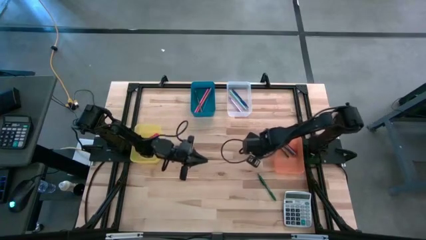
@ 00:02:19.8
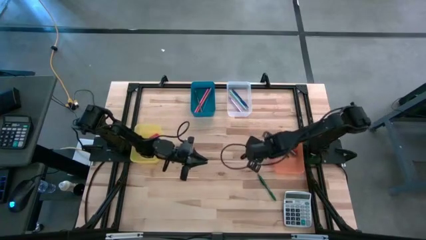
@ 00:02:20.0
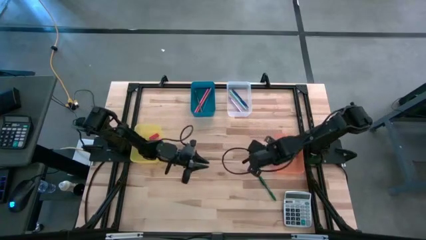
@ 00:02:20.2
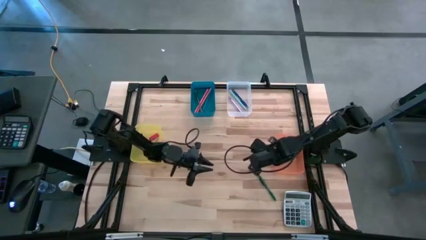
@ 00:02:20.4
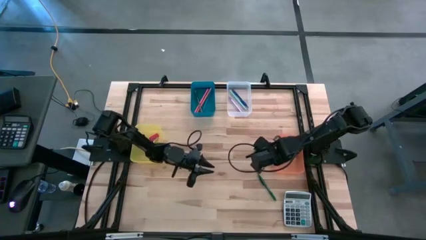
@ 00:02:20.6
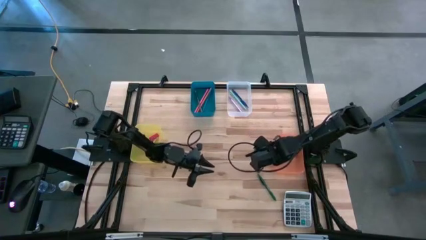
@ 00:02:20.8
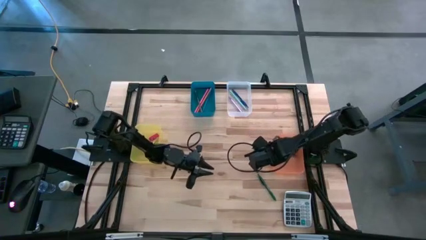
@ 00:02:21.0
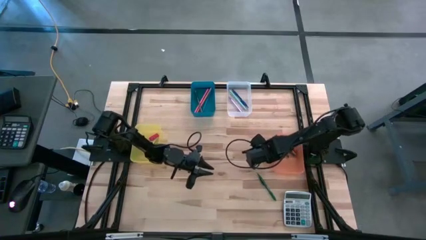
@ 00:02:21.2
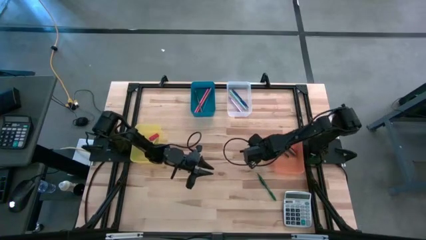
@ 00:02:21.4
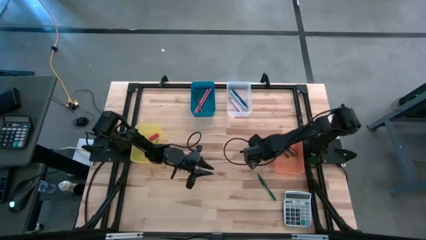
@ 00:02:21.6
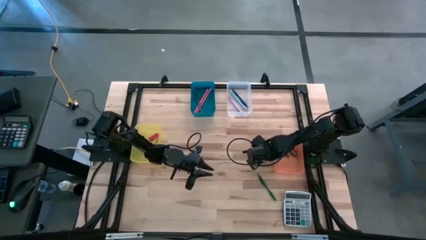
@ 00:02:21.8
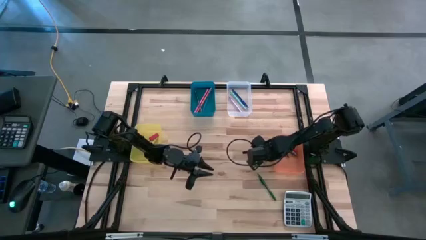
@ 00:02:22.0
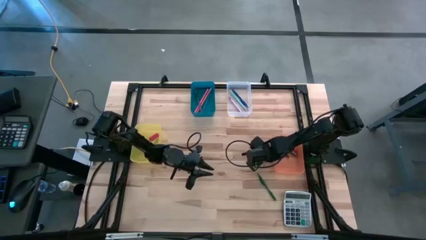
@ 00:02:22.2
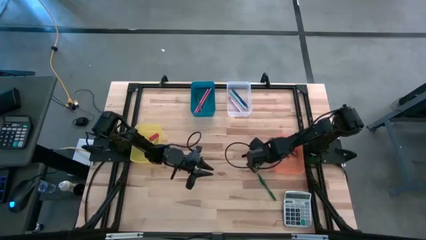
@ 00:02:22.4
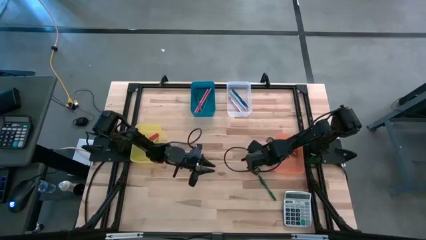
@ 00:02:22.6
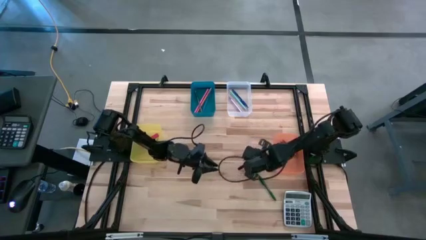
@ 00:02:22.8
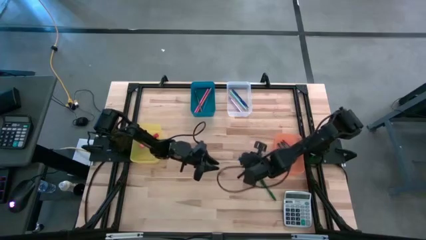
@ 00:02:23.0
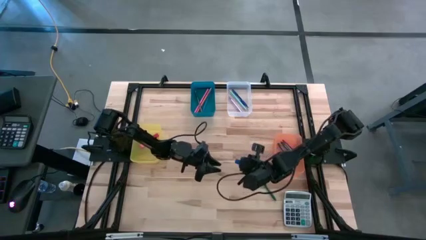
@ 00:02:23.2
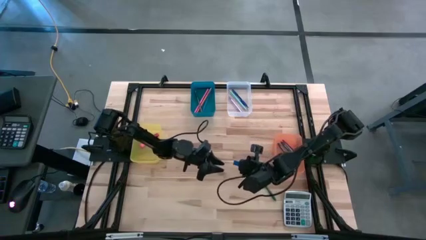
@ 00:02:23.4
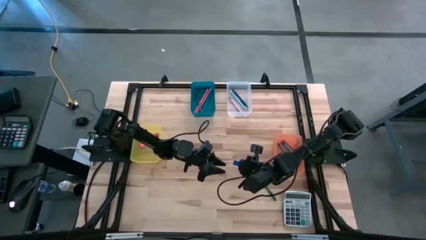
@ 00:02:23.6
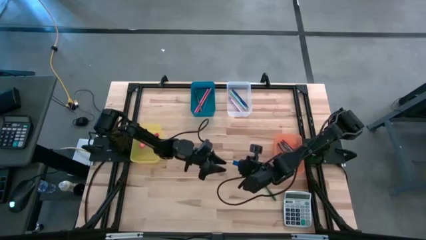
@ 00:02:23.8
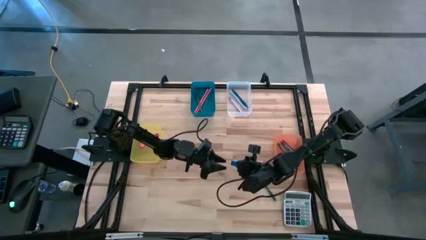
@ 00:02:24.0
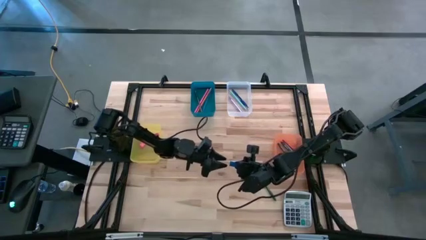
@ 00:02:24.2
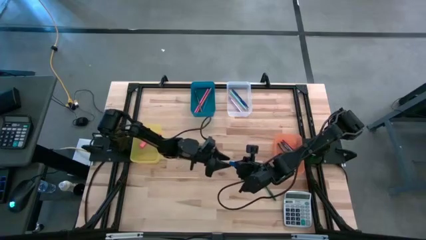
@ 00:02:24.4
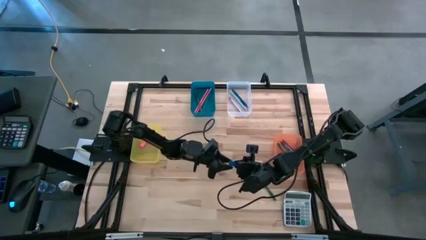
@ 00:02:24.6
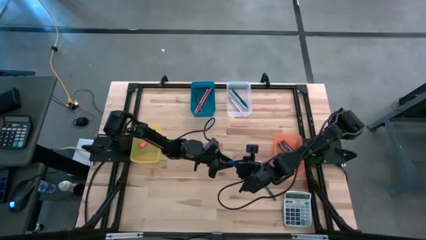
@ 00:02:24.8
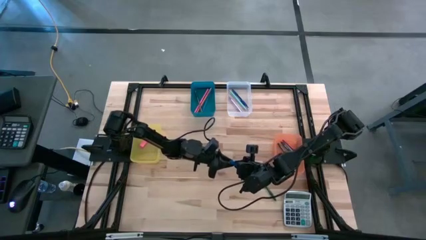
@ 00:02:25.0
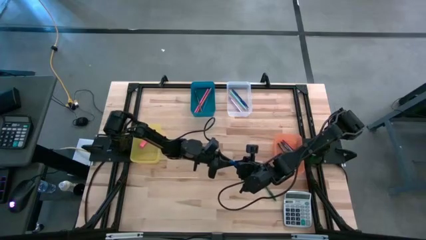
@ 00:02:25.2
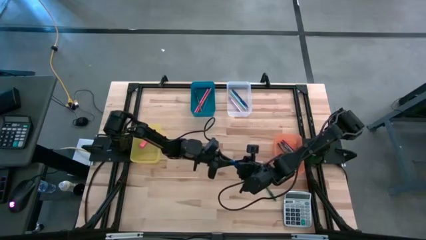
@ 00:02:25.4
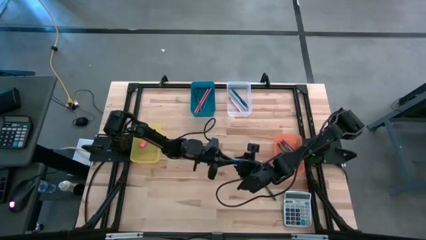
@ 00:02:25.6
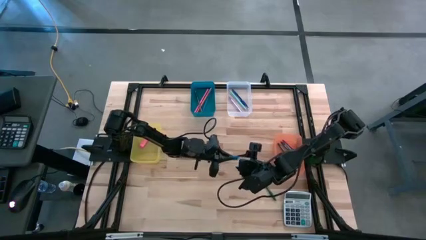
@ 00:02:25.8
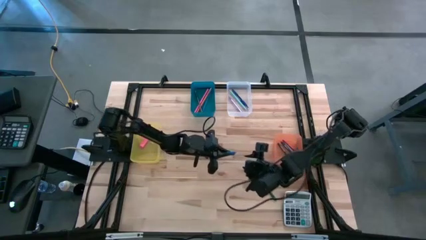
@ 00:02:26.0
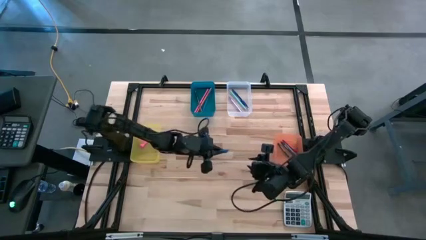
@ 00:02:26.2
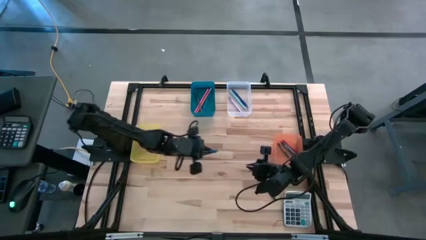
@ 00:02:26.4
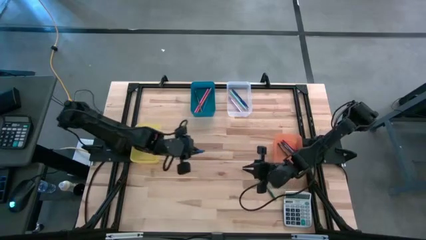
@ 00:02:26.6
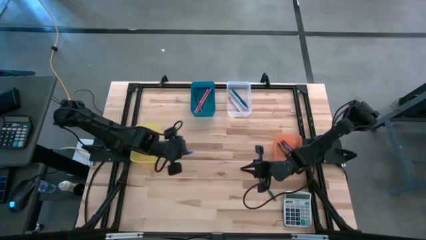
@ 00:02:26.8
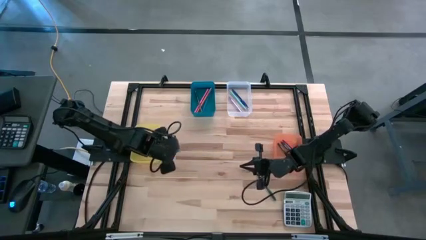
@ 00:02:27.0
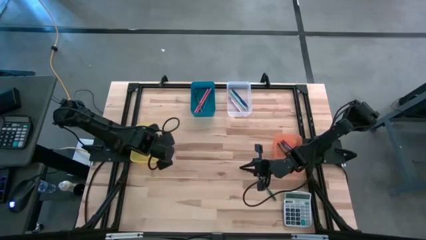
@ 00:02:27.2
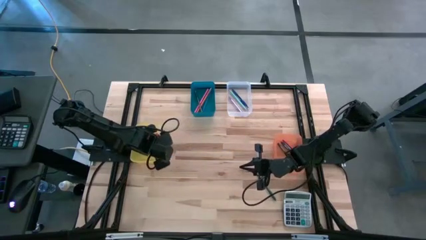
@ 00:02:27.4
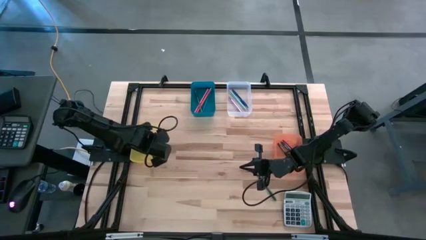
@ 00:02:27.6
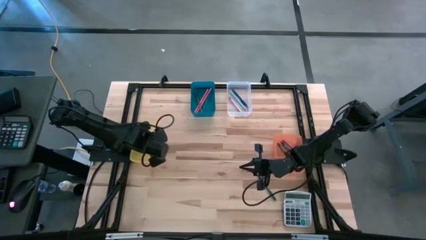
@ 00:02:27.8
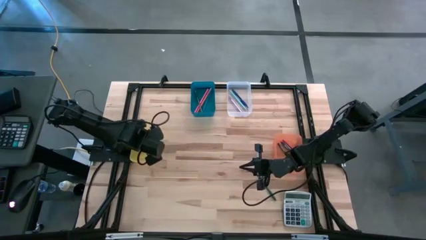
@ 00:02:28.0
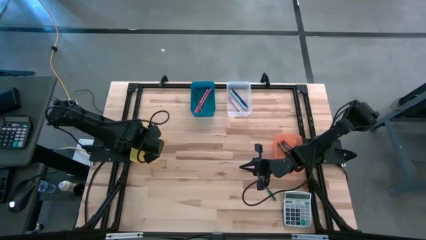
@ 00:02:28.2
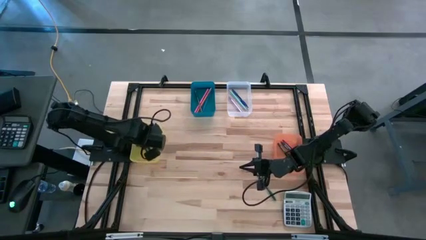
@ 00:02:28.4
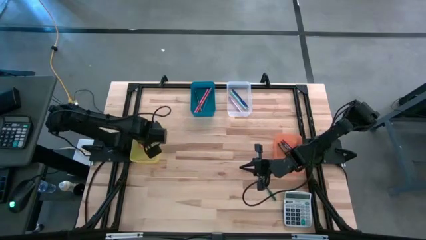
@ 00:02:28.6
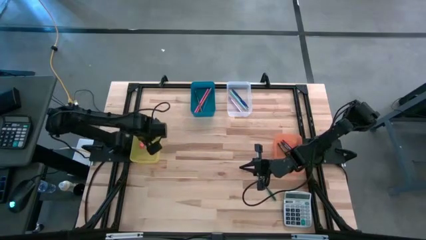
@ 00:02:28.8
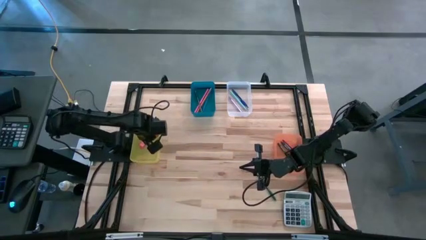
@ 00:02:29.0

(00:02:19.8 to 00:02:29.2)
Task: Sort crayons/erasers/pens/pencils in bins
Put the blue eraser into the yellow bin

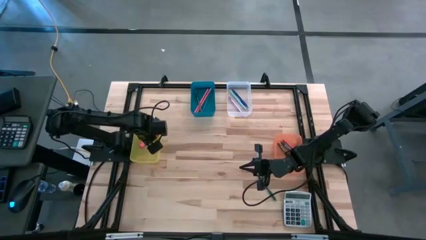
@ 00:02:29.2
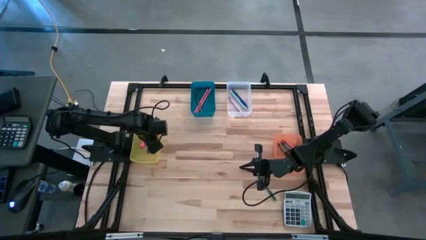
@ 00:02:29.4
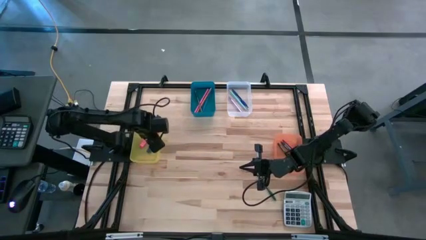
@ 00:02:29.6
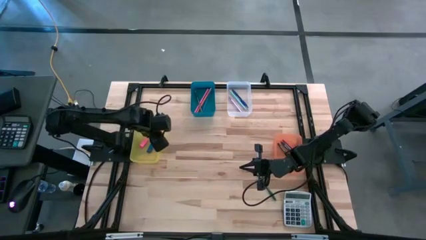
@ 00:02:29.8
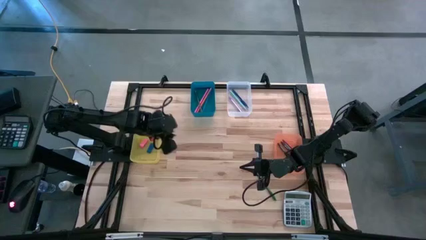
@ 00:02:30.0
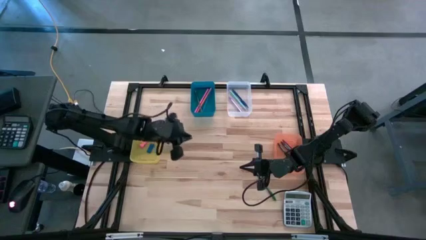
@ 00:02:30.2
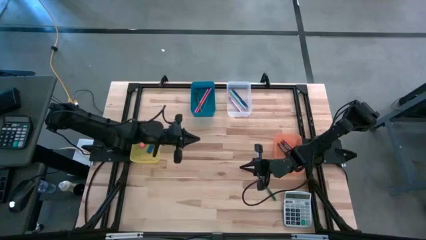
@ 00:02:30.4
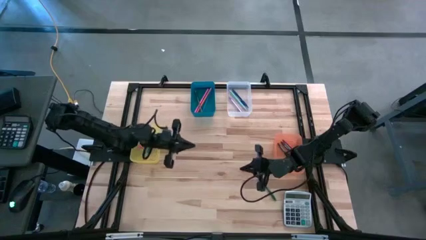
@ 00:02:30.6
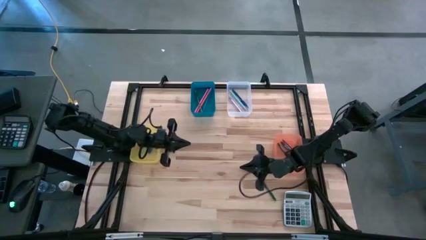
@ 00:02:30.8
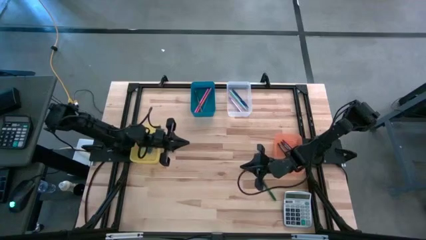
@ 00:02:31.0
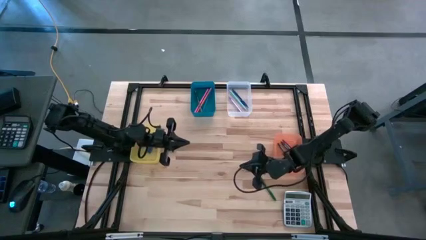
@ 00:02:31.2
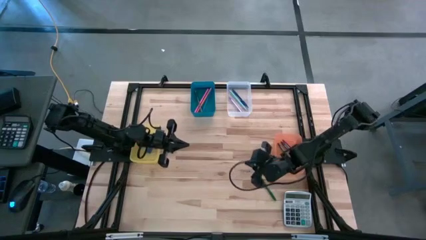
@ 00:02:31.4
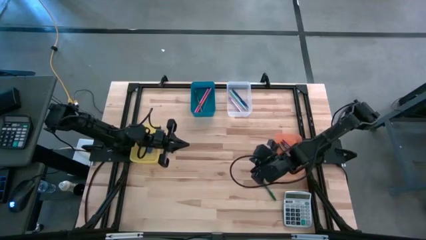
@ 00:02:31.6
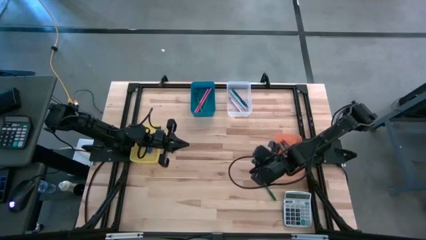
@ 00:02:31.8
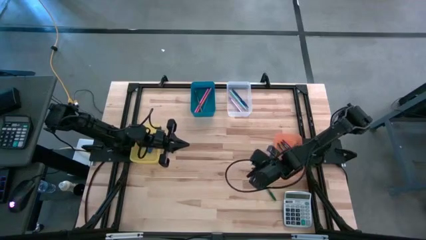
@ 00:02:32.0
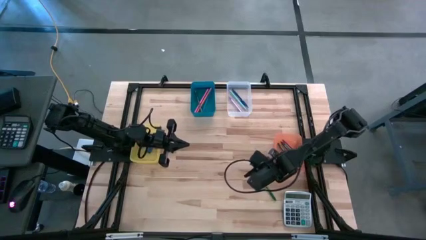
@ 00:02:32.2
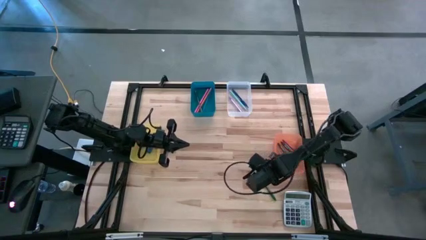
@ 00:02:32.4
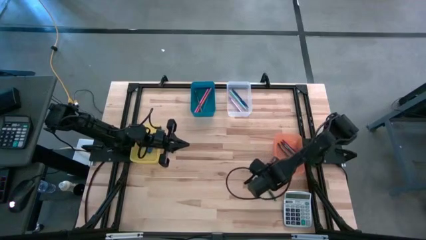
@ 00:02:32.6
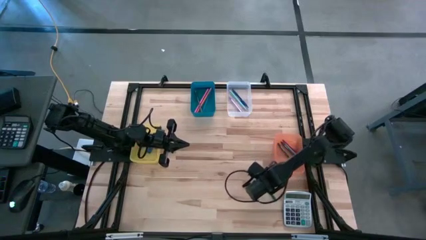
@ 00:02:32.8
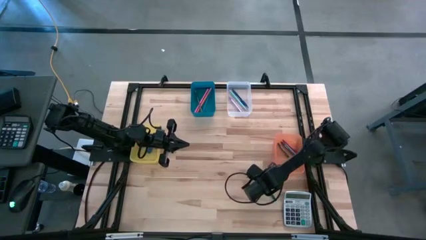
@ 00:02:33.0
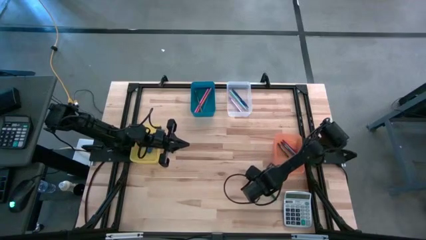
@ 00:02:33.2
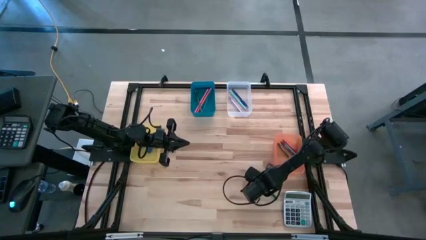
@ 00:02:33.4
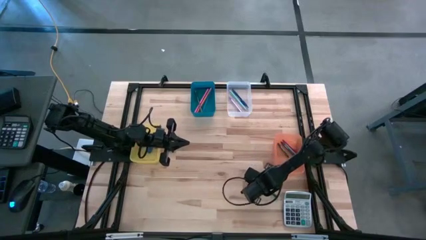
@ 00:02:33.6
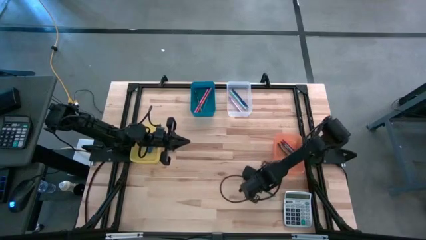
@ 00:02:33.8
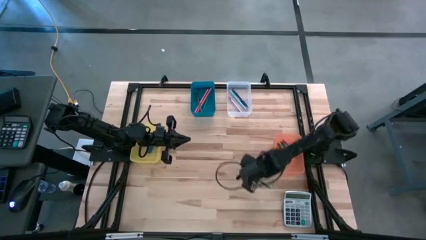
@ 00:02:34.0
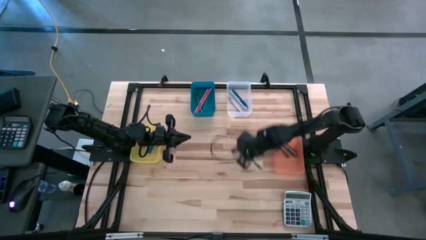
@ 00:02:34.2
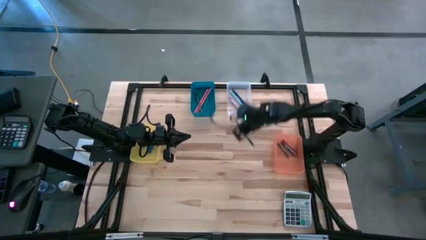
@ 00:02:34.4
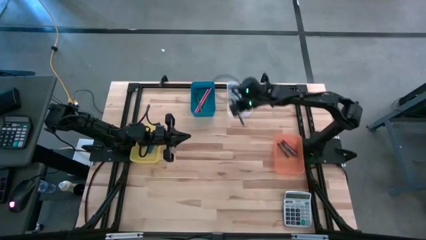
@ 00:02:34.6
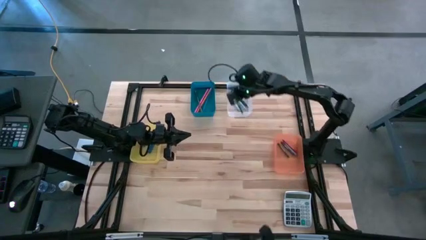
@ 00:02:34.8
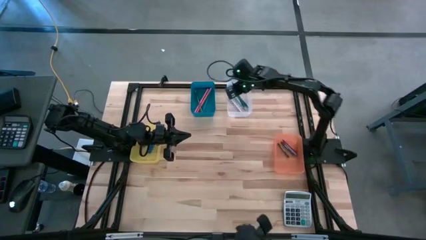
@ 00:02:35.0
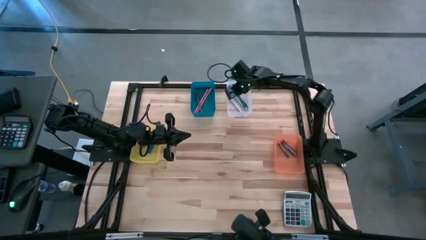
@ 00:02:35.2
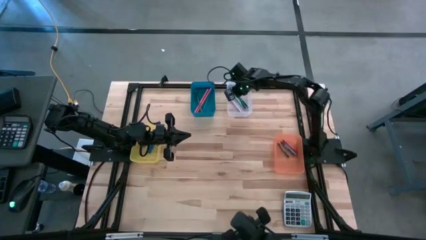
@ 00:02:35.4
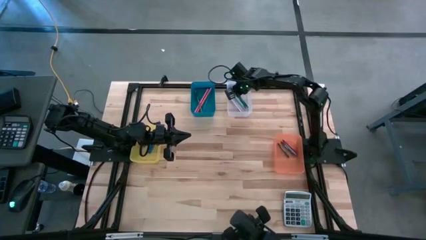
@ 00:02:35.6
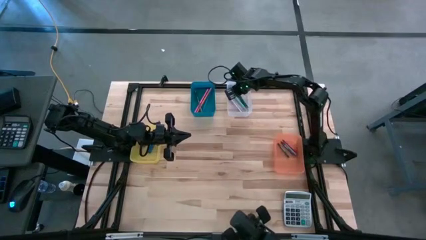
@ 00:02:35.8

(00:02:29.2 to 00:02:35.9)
Put the green ballpen into the white bin

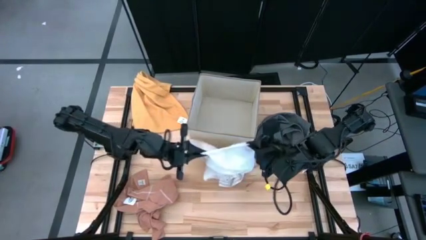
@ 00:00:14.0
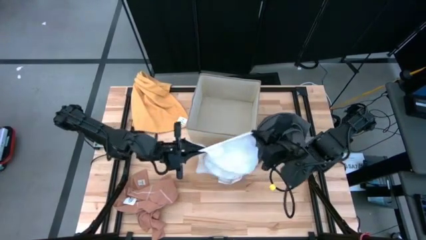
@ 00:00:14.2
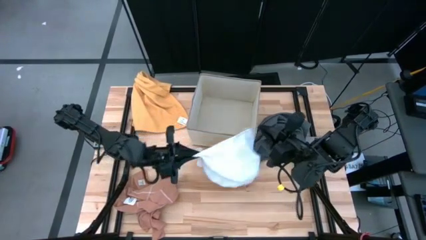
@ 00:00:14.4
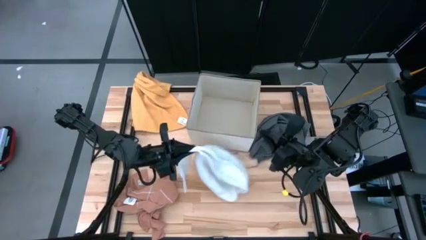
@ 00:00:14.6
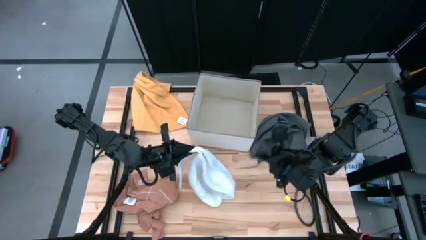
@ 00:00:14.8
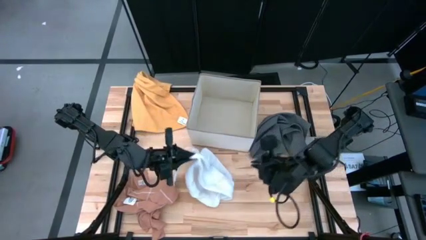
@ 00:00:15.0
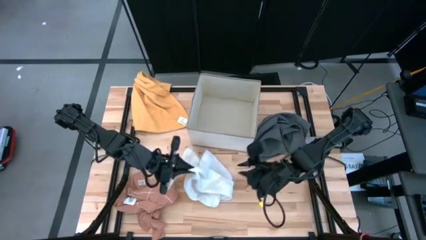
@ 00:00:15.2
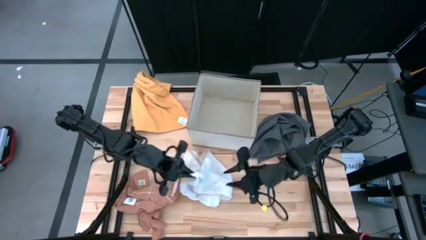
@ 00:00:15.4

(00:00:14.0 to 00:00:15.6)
Task: Fold towel
Fold the white towel
